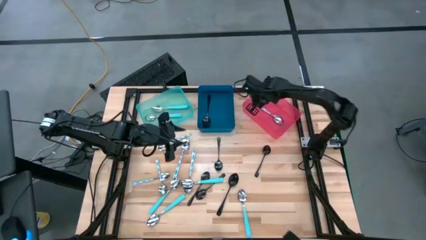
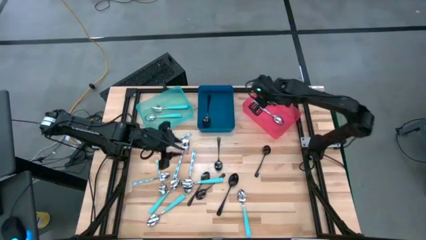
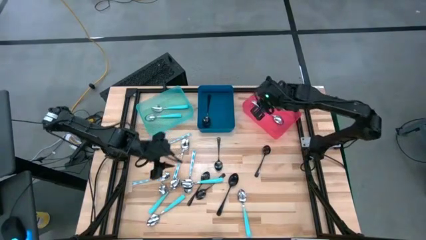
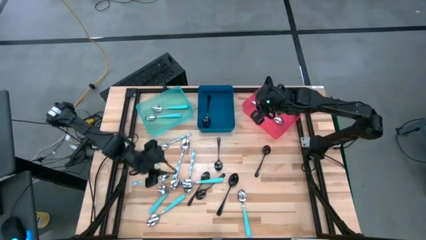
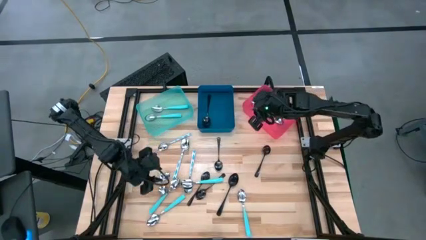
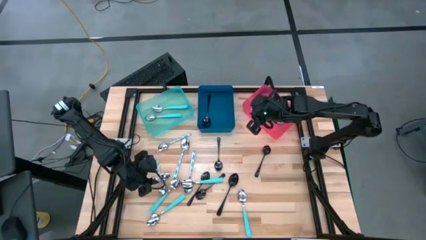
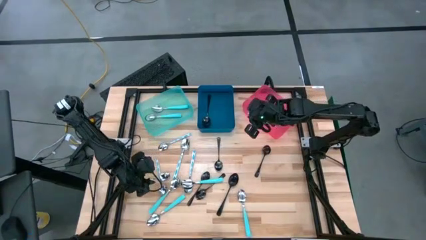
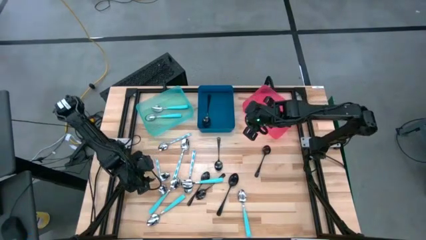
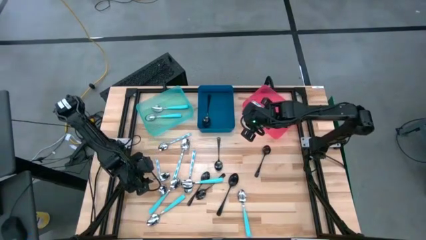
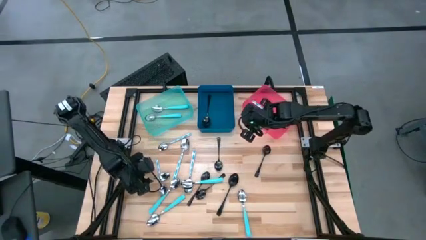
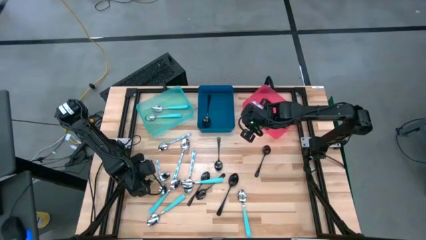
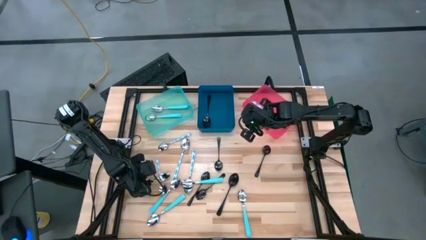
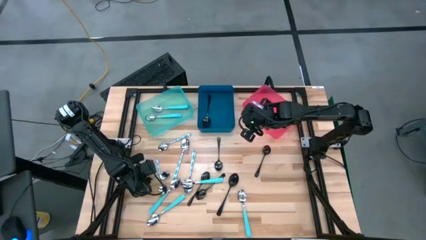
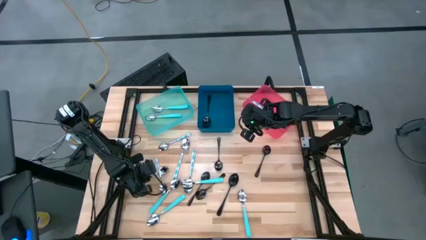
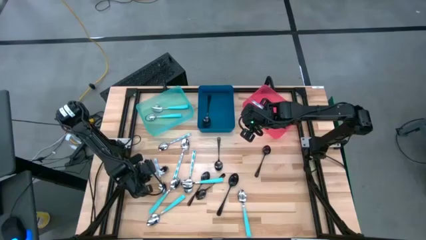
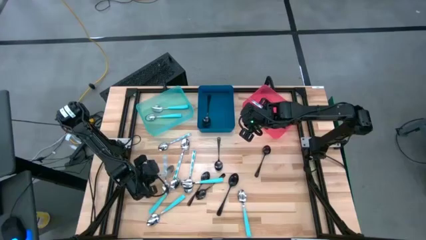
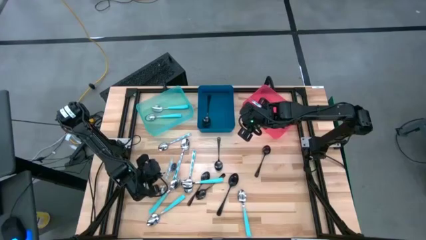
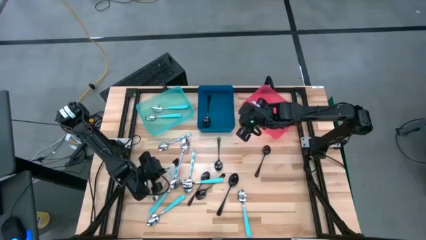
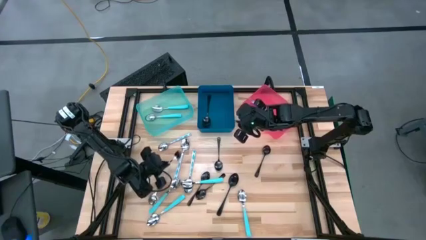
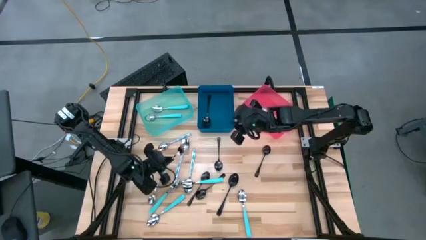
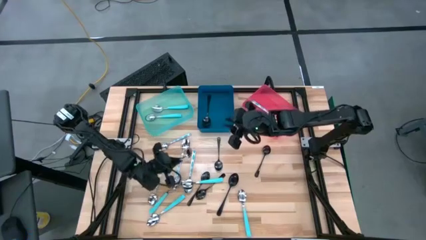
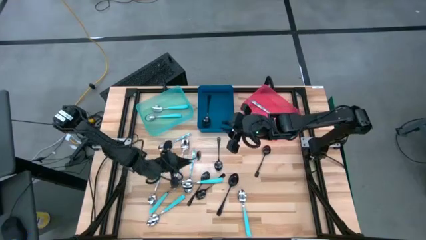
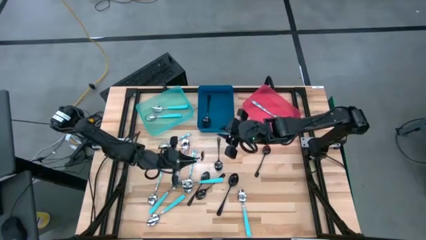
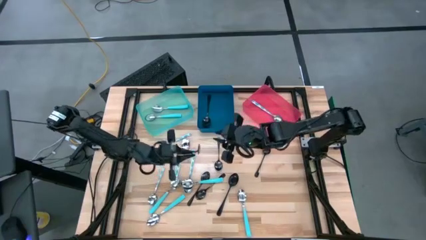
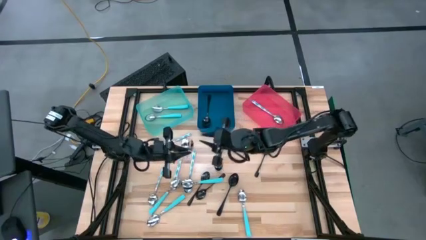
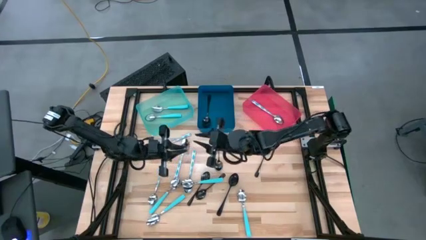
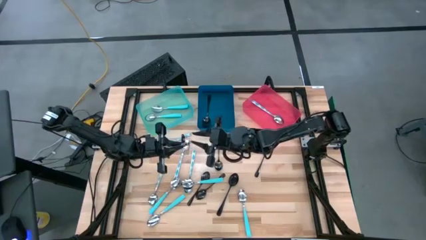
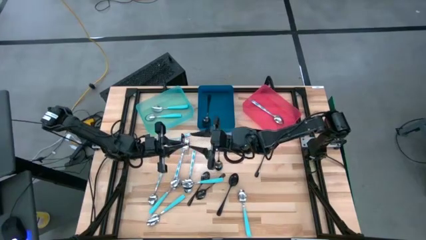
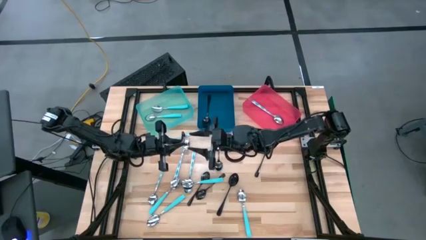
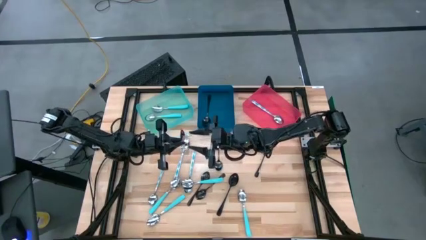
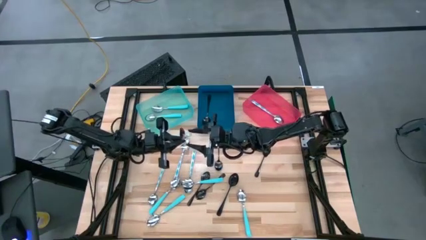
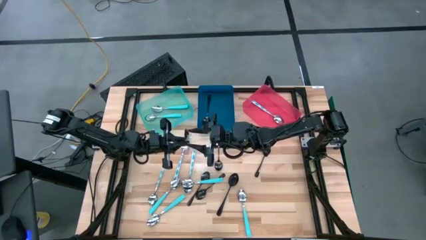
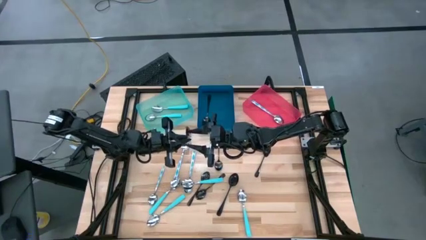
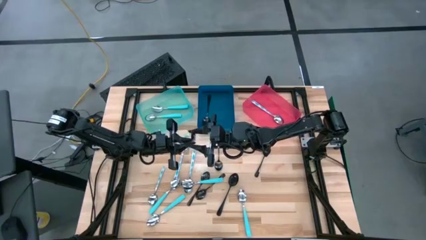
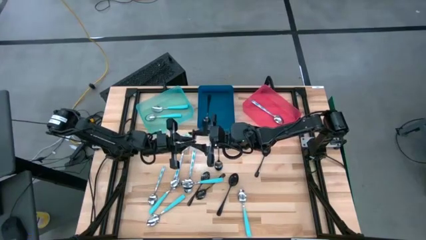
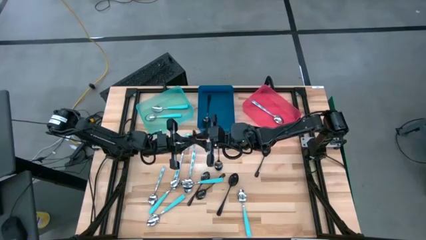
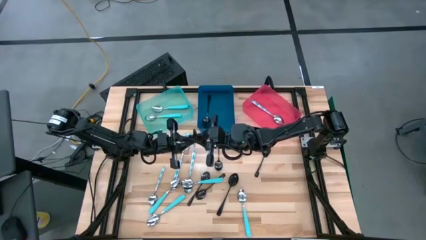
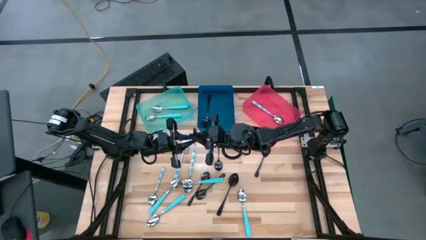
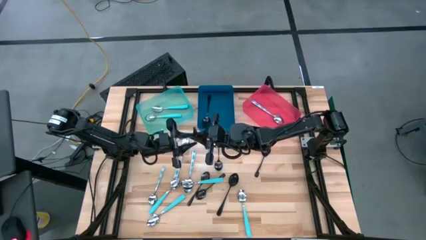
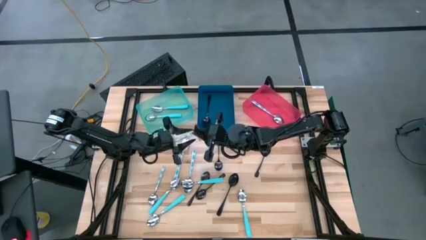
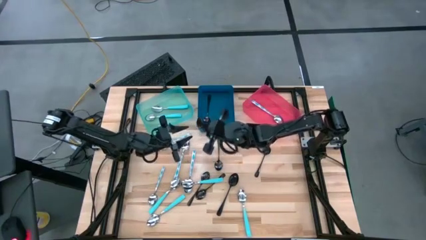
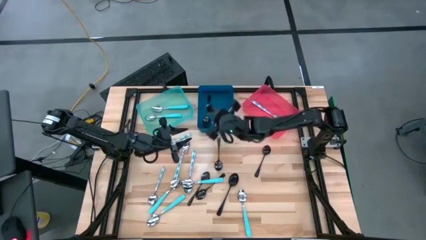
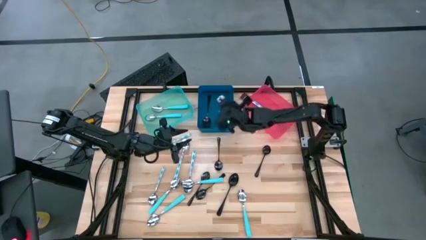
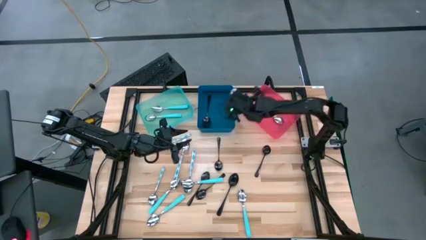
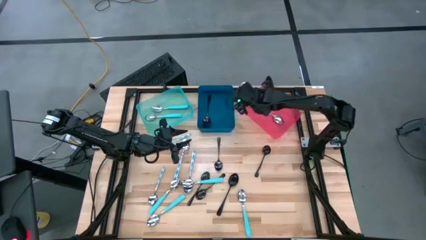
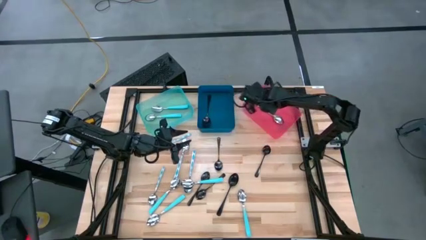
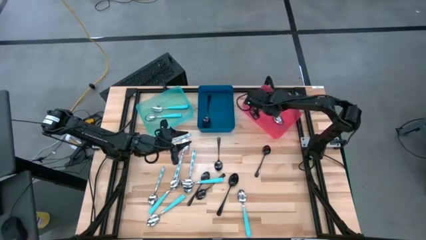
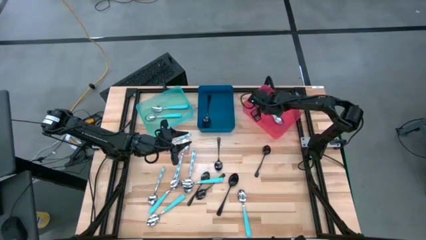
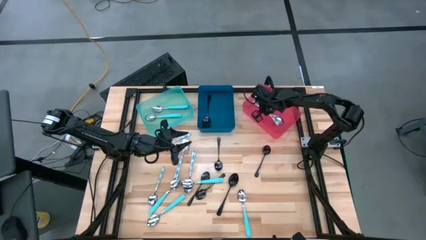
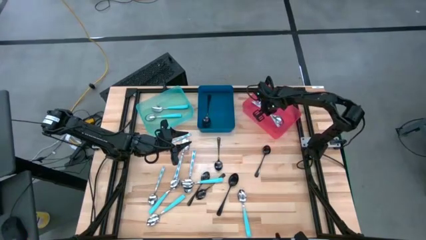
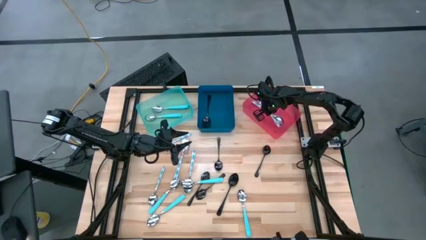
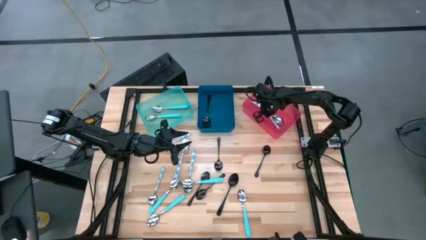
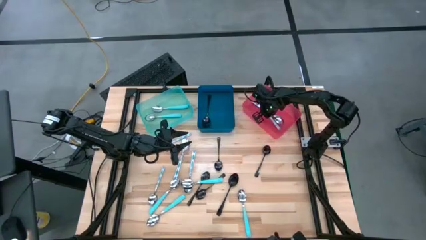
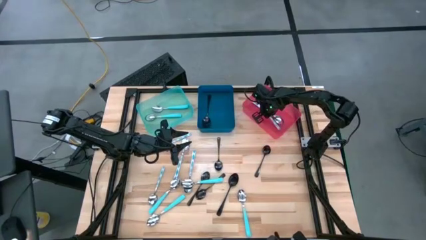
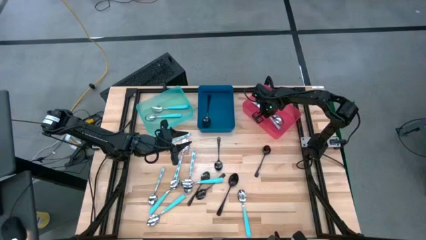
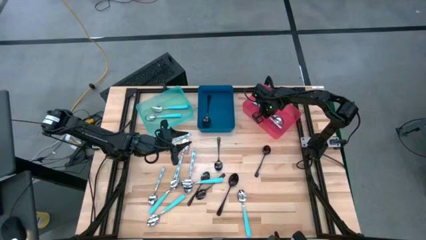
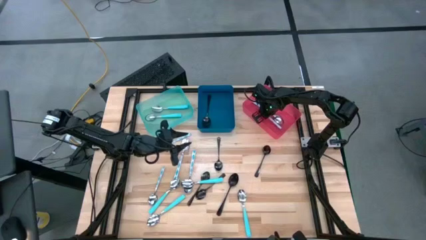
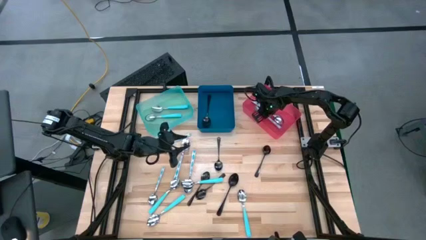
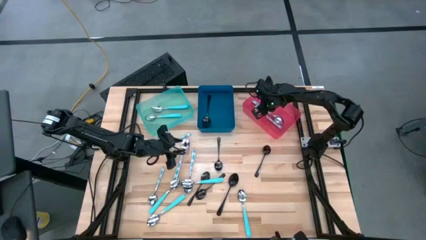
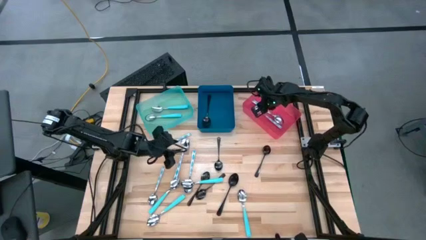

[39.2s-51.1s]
Task: Sort silverware by color (type)
Put the white patterned spoon into the pink bin
